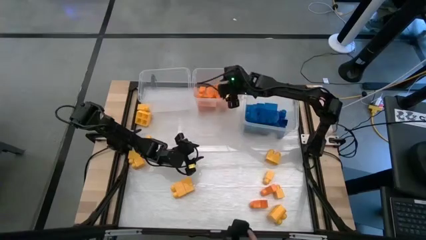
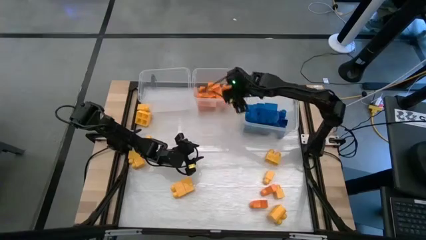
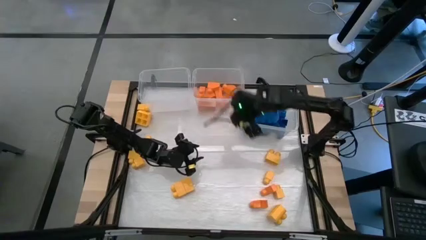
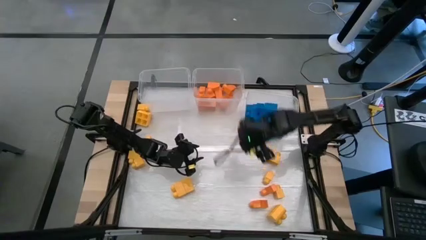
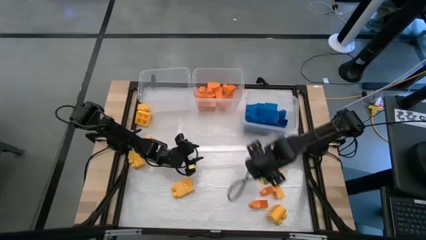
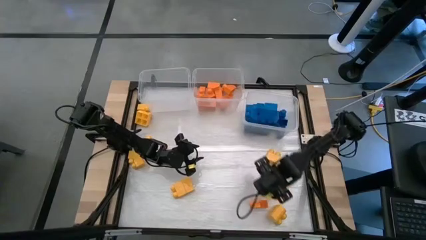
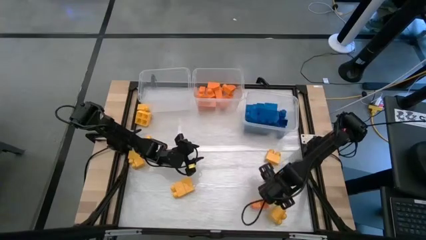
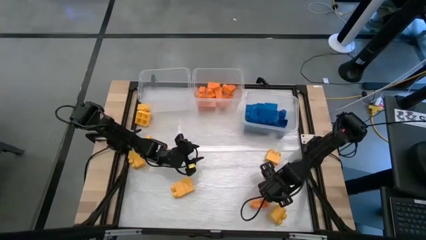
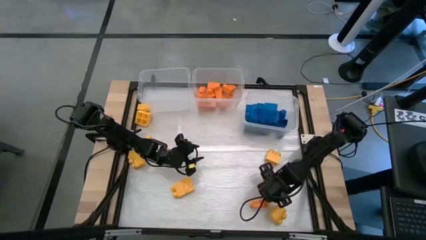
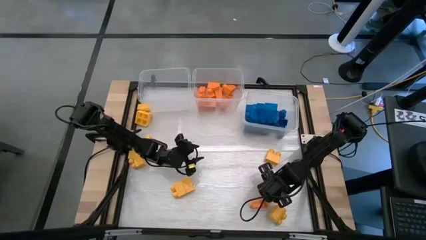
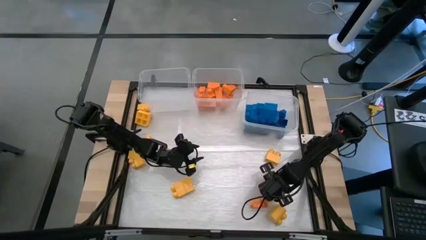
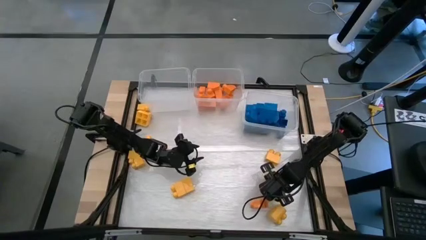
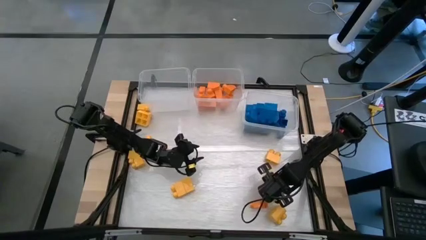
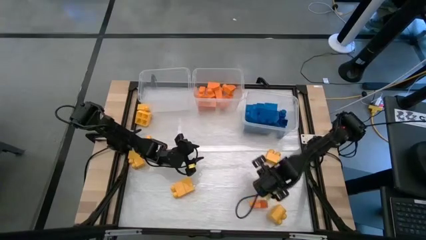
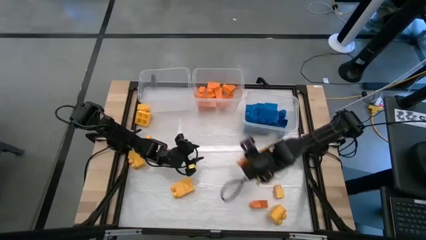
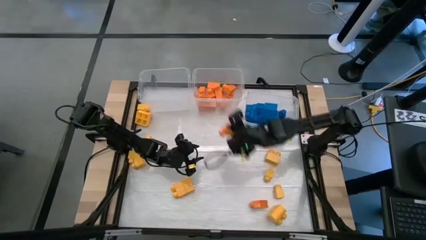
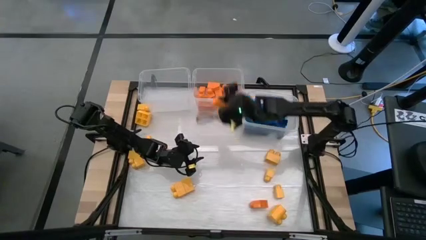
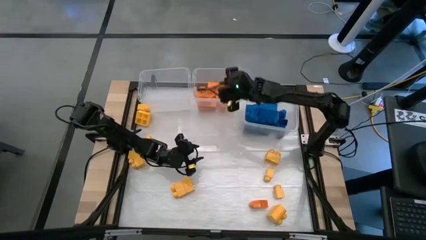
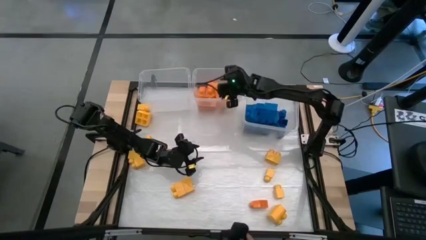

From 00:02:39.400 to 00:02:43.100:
Task: Sort blocks
Put the orange game piece into the middle transparent bin

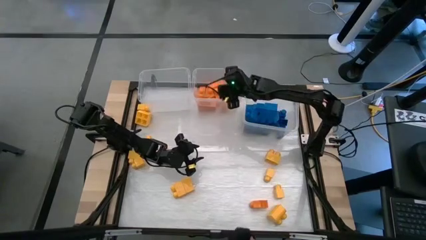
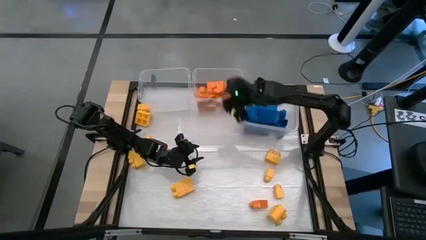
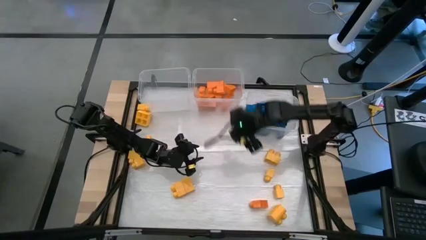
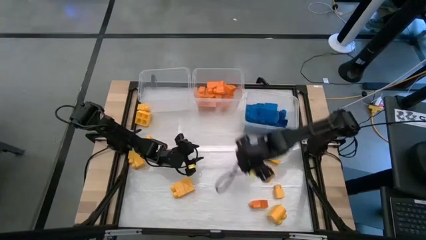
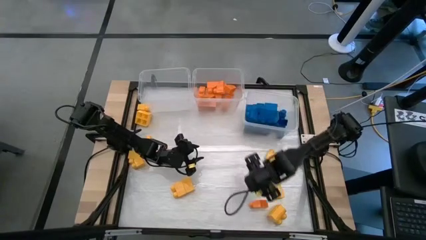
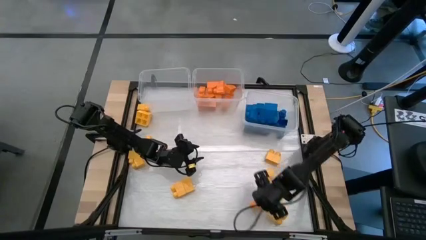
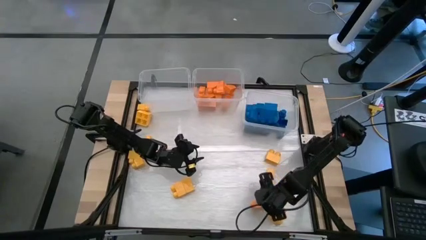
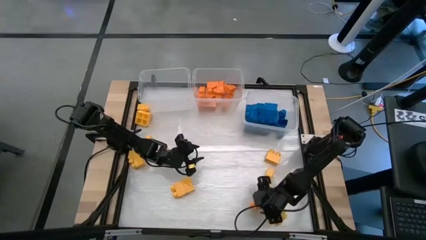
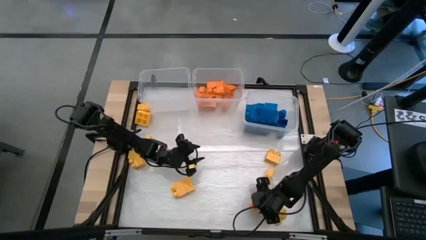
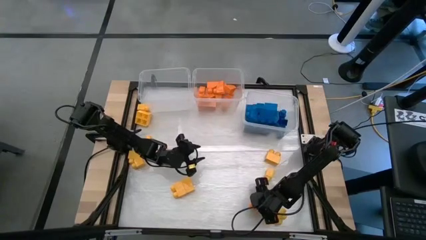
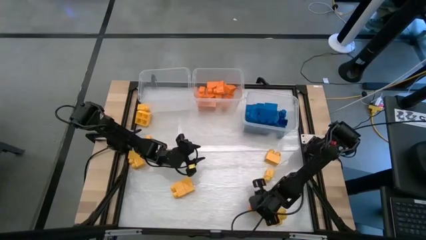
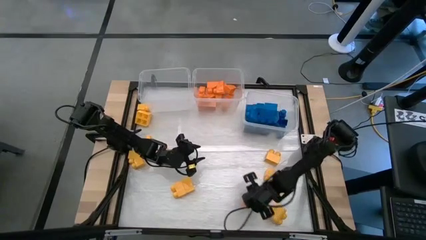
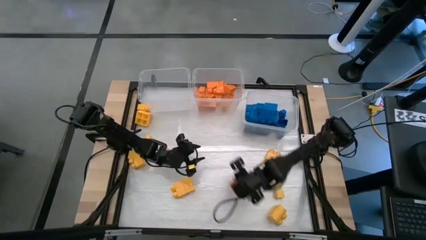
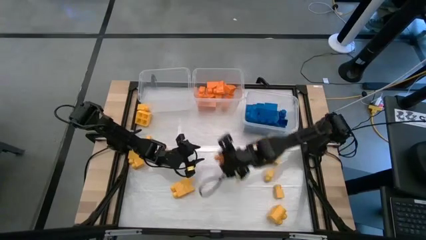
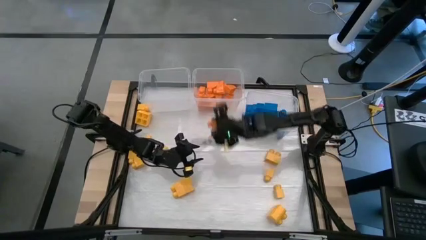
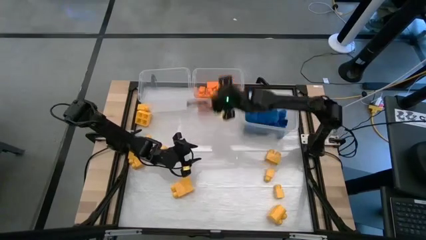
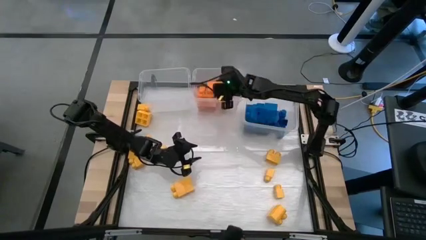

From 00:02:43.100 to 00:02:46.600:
Put the orange game piece into the middle transparent bin

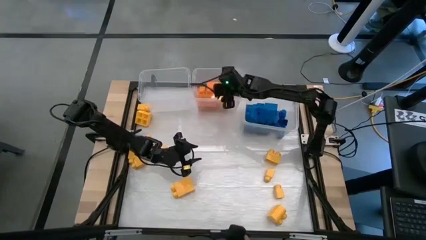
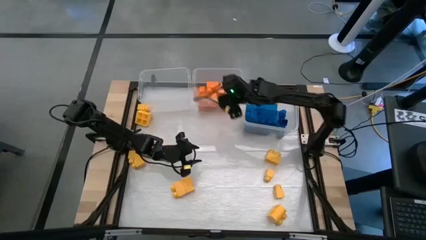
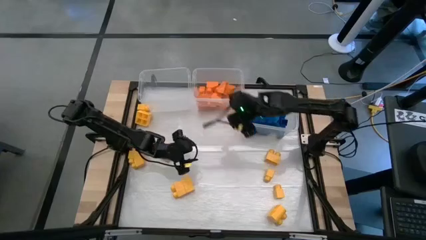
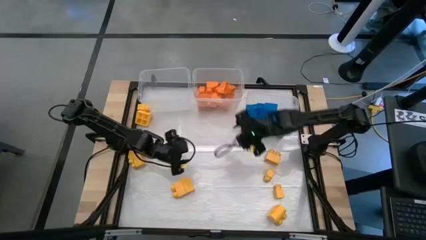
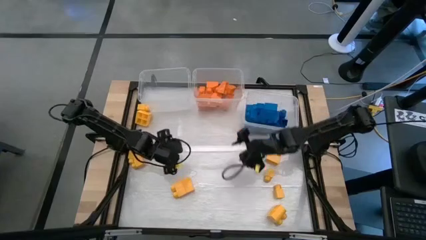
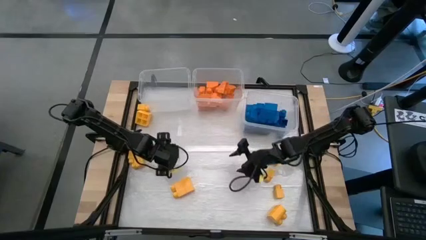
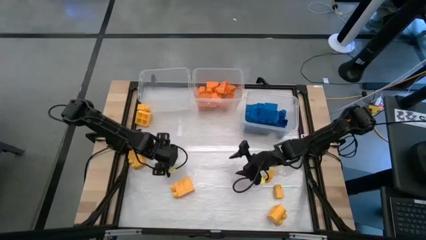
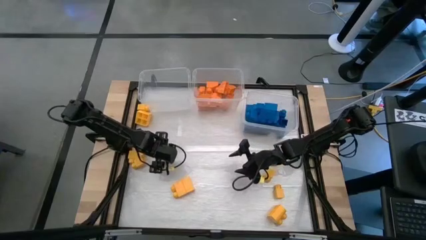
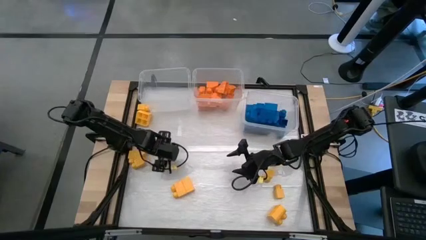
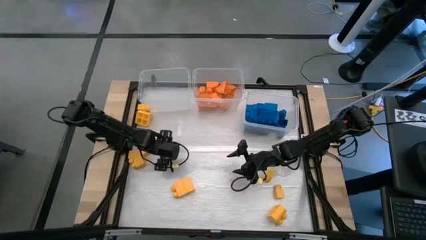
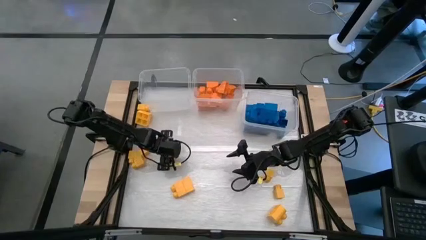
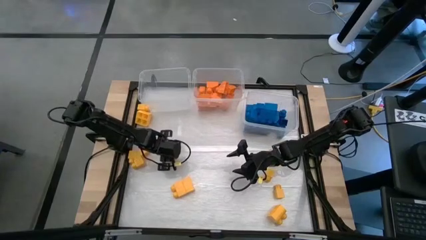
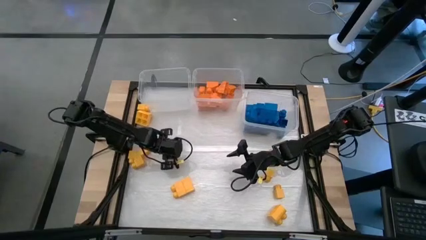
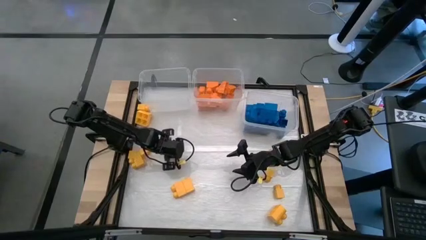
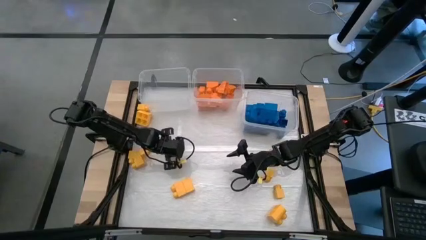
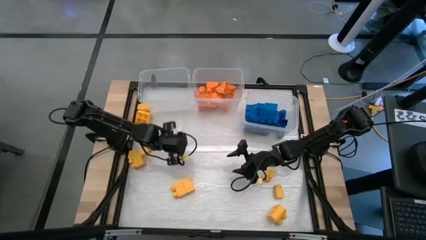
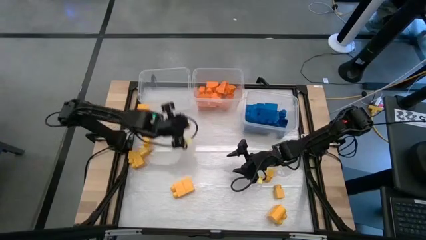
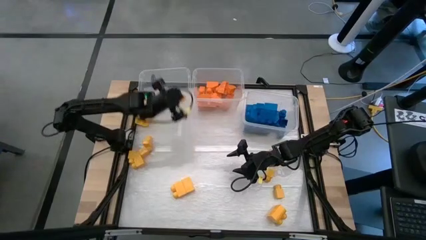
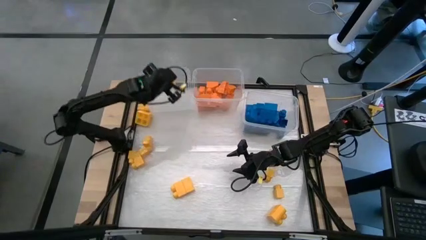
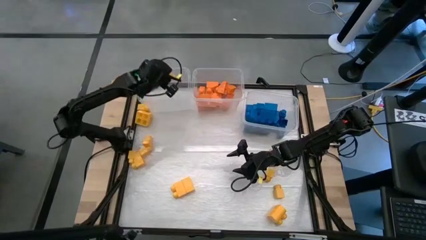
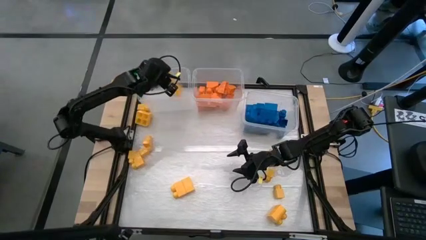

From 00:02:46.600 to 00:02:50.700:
Put the yellow game piece into the left transparent bin

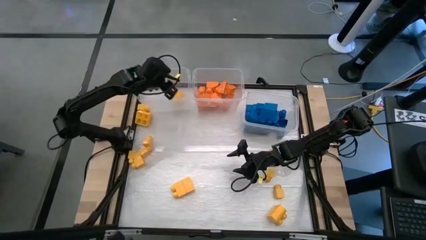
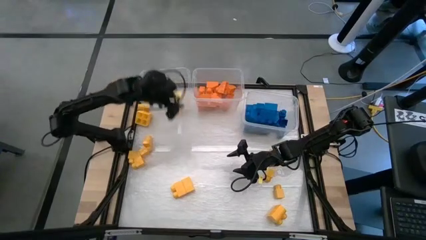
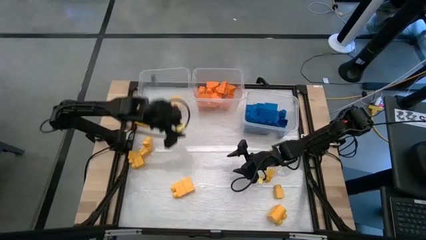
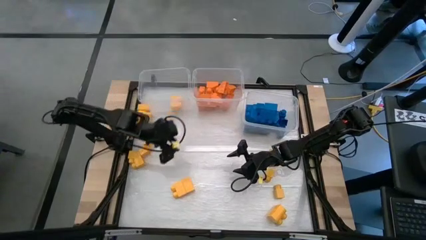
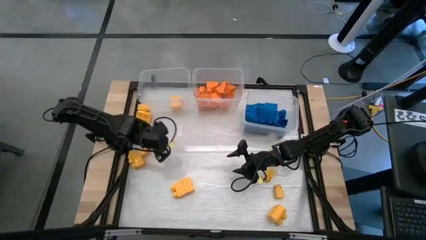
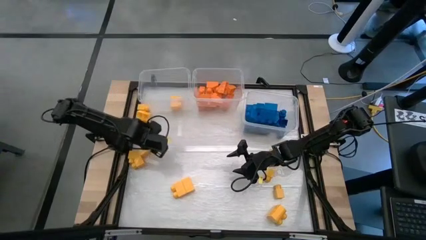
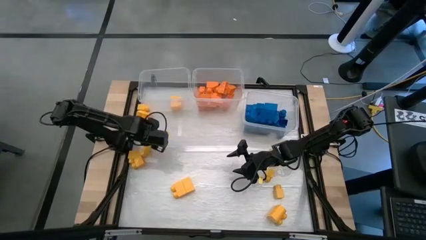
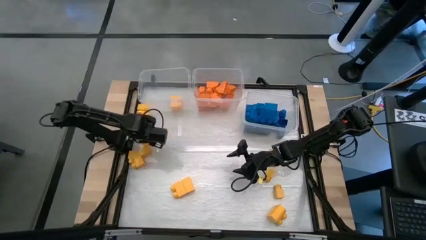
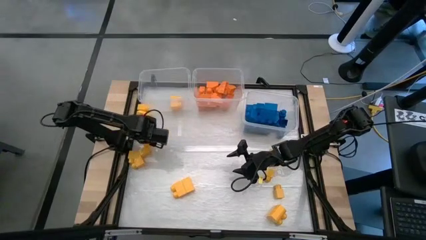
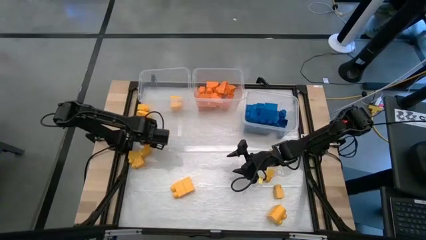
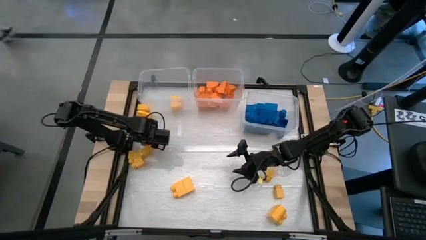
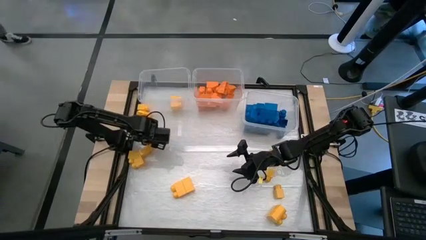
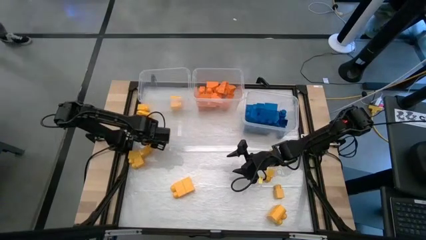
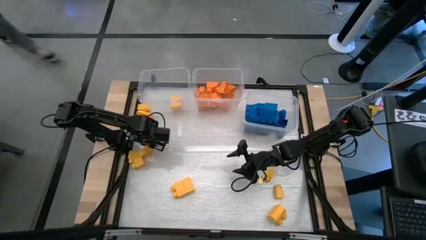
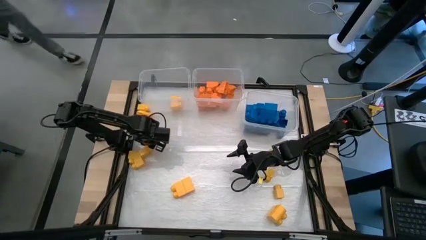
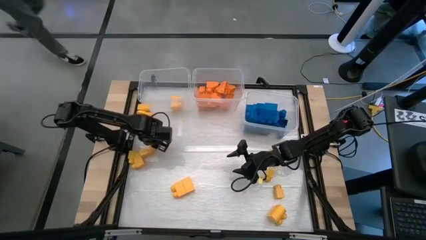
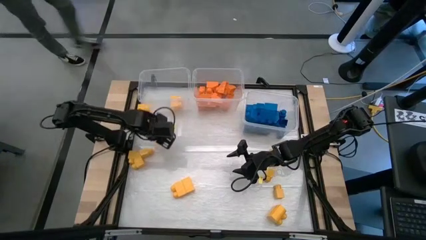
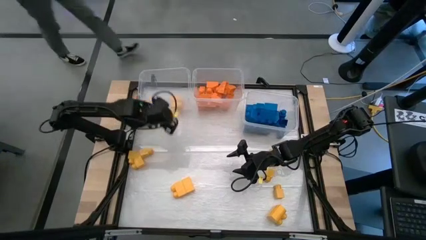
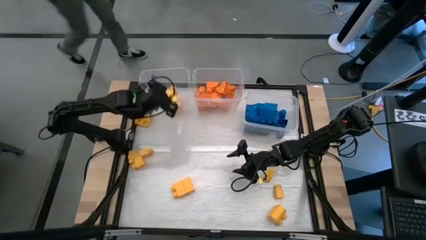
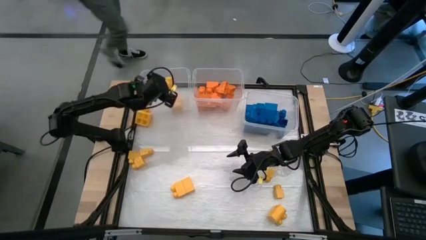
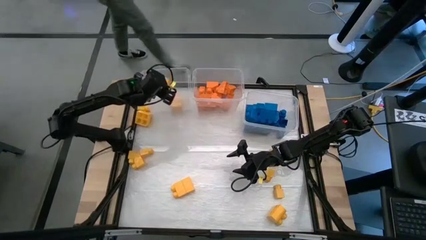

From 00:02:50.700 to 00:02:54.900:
Put the yellow game piece into the left transparent bin

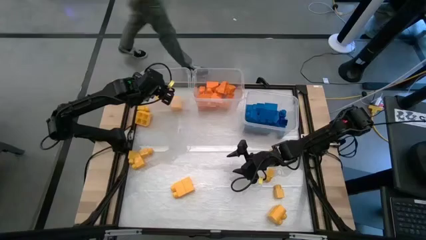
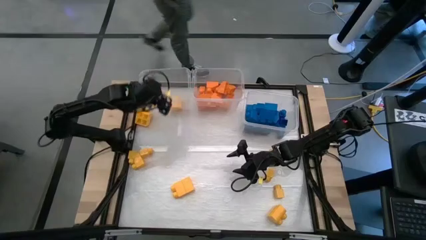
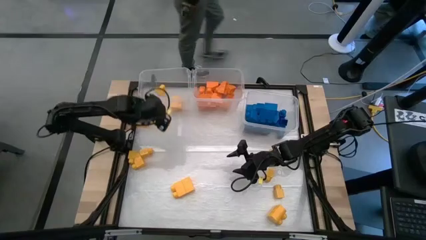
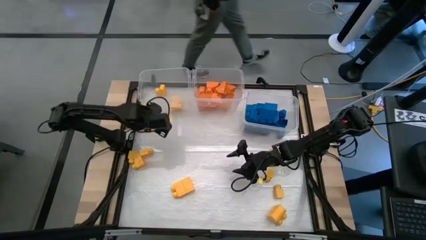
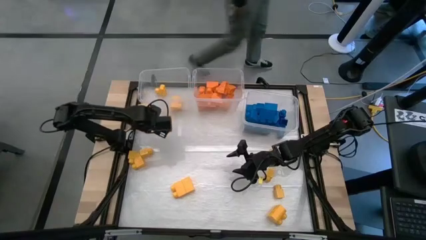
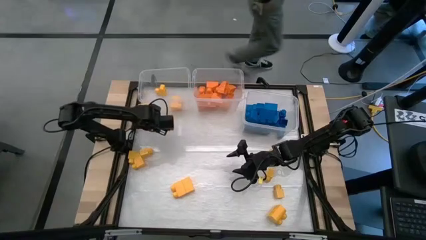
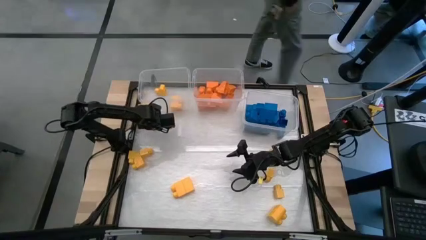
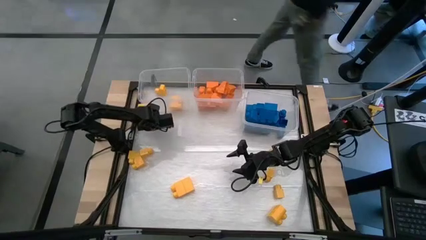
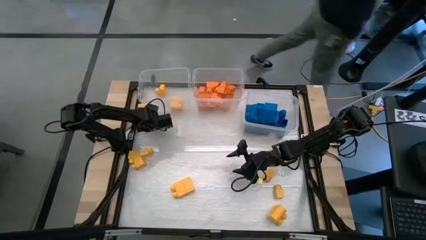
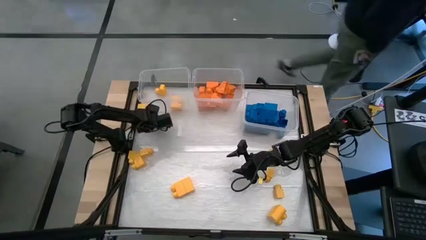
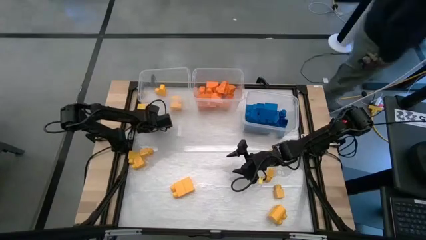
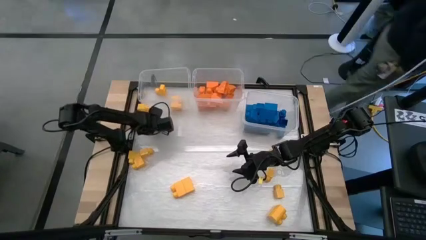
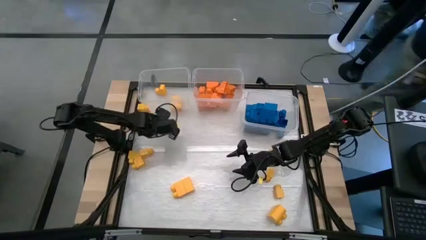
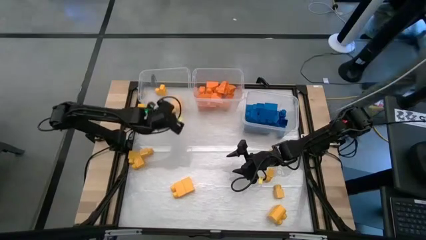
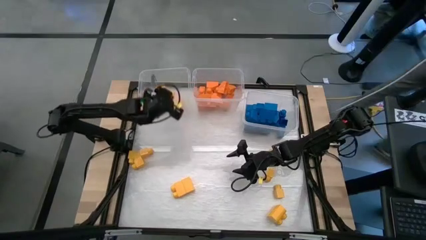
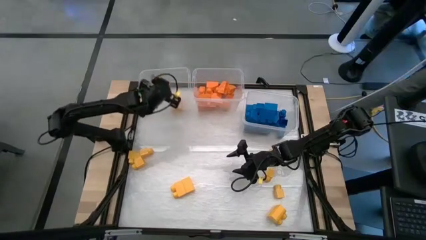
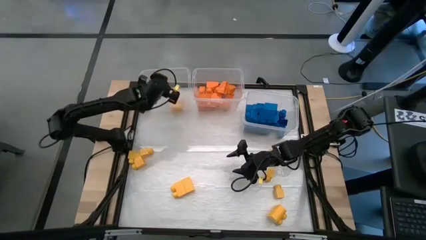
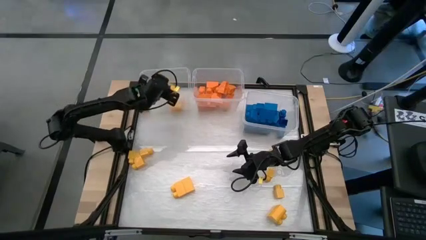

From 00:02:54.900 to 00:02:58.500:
Put the yellow game piece into the left transparent bin
